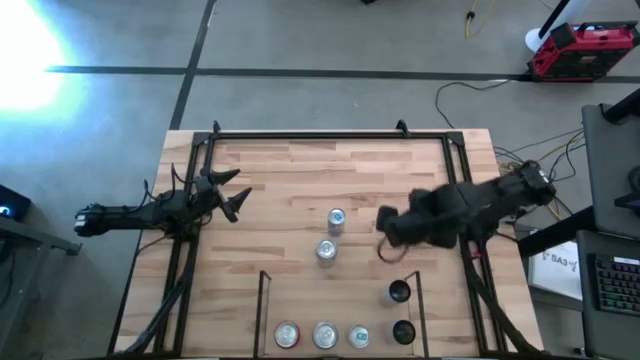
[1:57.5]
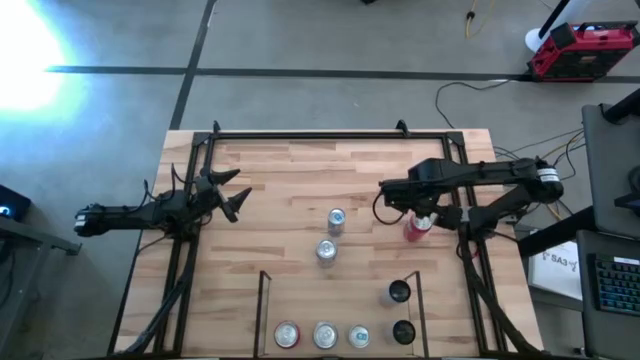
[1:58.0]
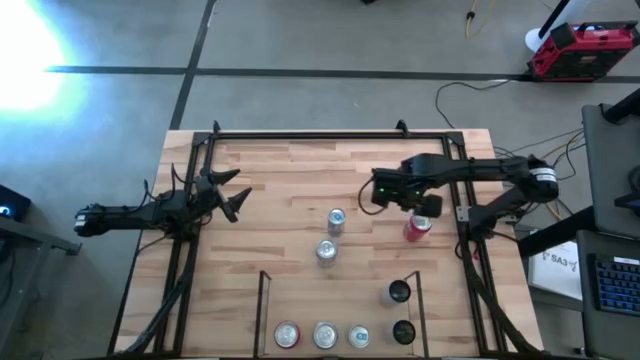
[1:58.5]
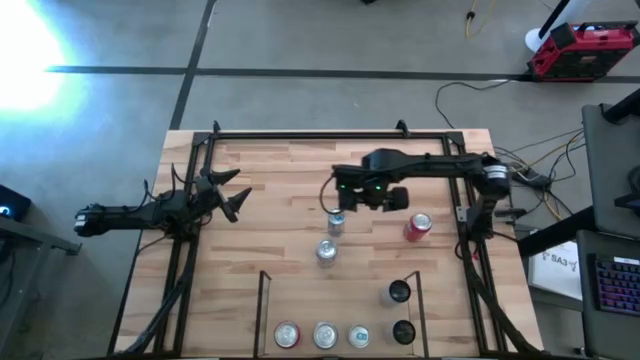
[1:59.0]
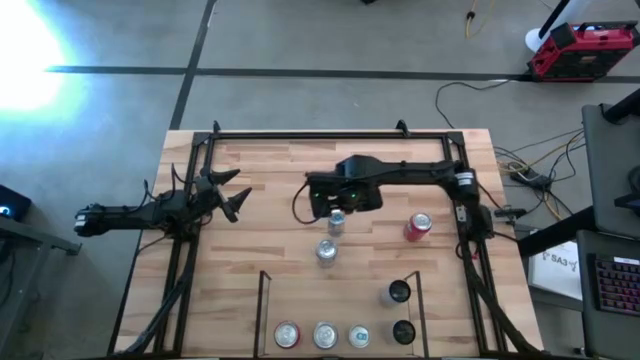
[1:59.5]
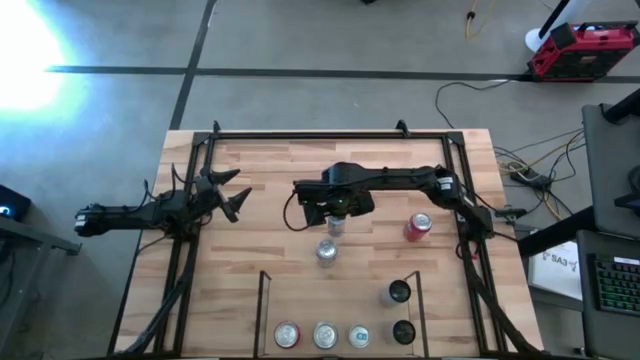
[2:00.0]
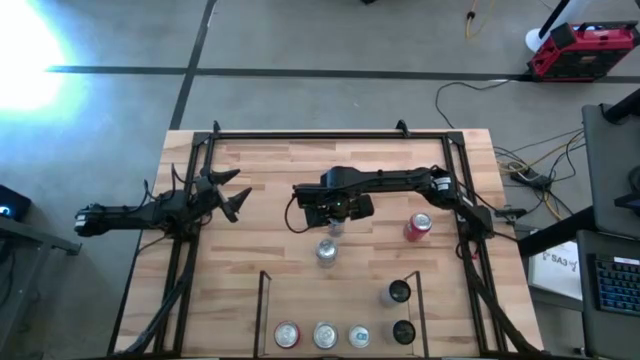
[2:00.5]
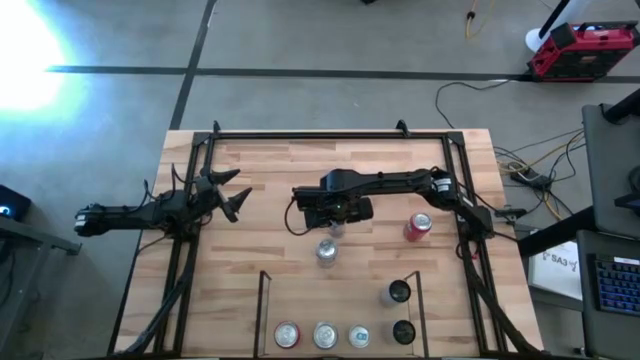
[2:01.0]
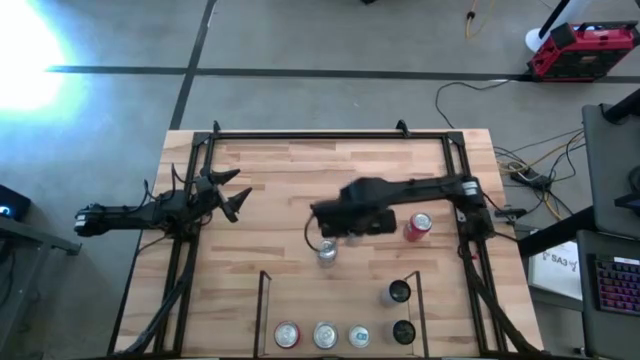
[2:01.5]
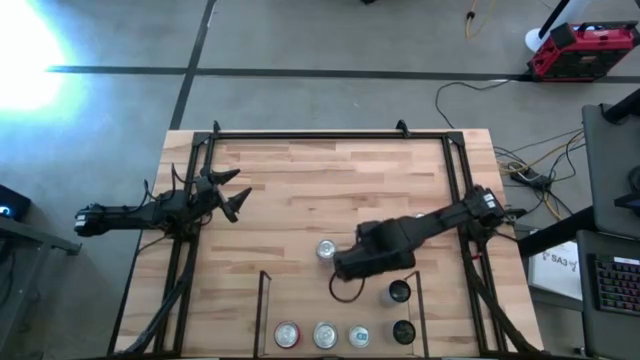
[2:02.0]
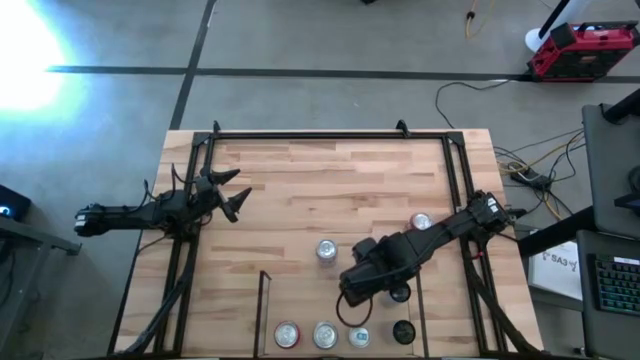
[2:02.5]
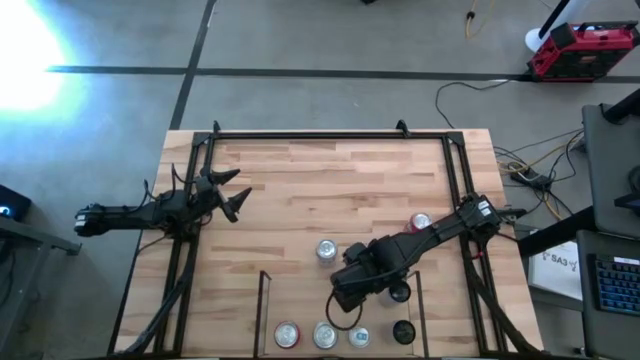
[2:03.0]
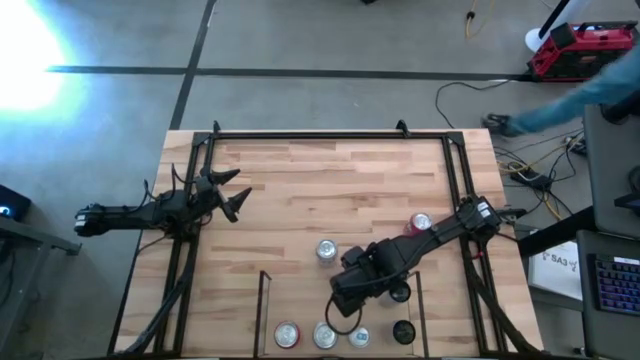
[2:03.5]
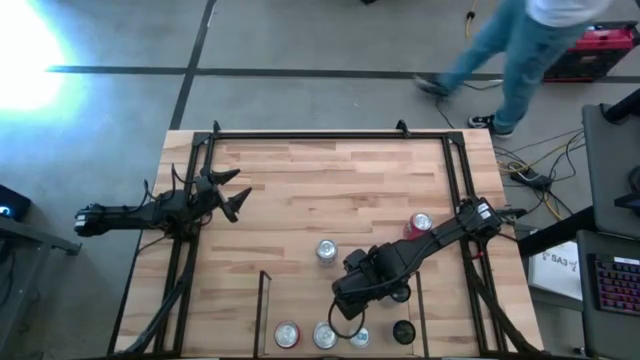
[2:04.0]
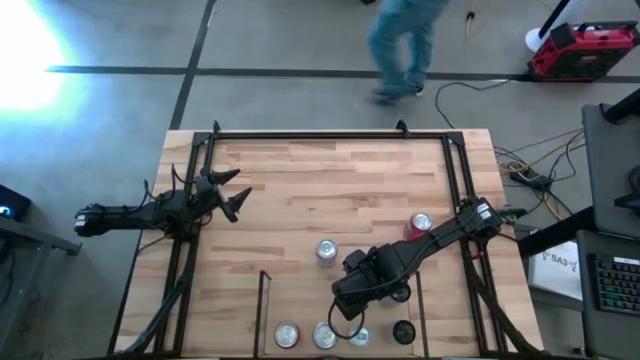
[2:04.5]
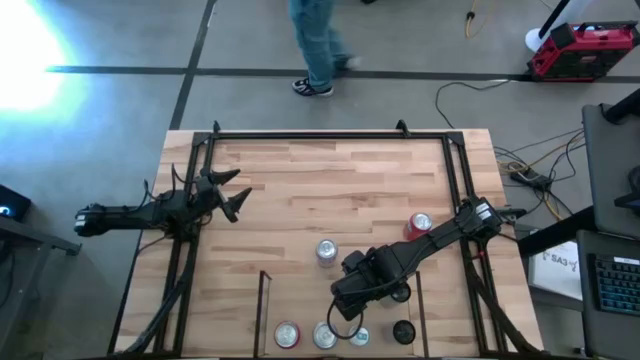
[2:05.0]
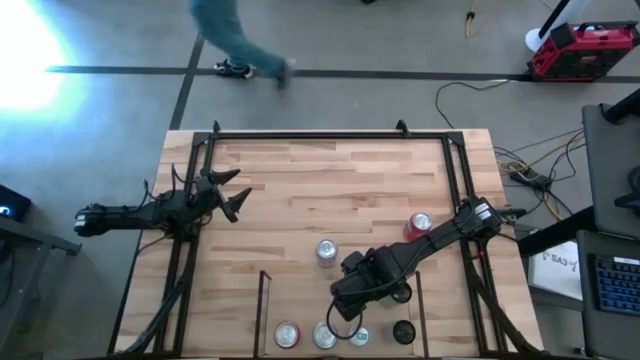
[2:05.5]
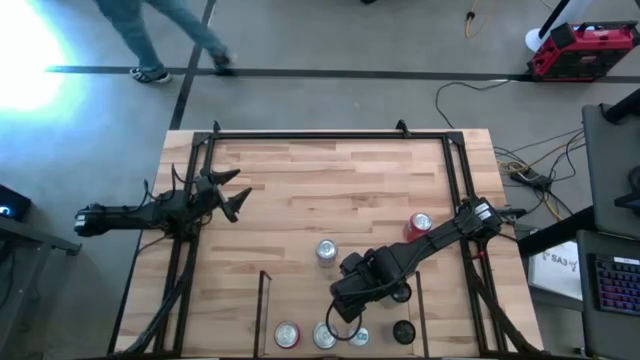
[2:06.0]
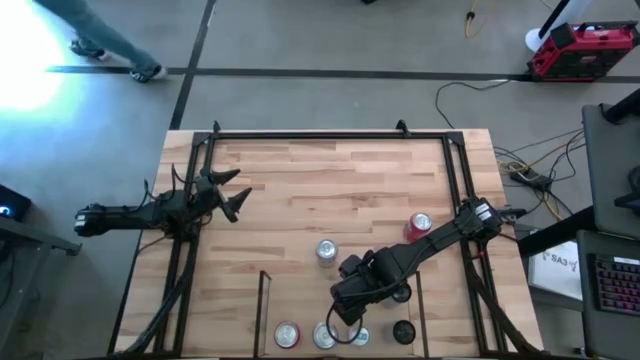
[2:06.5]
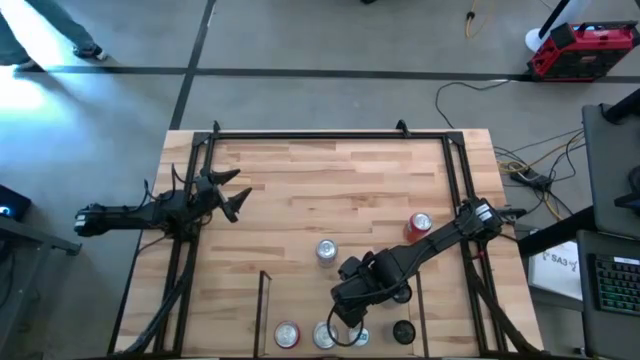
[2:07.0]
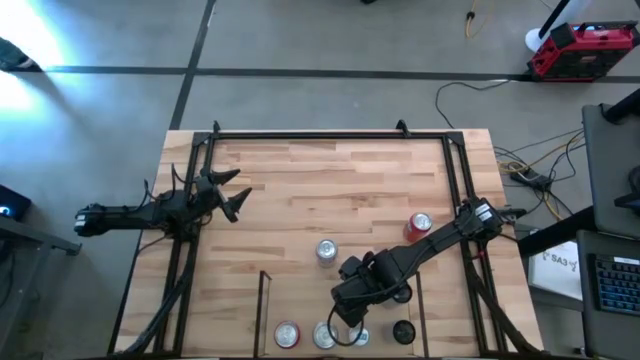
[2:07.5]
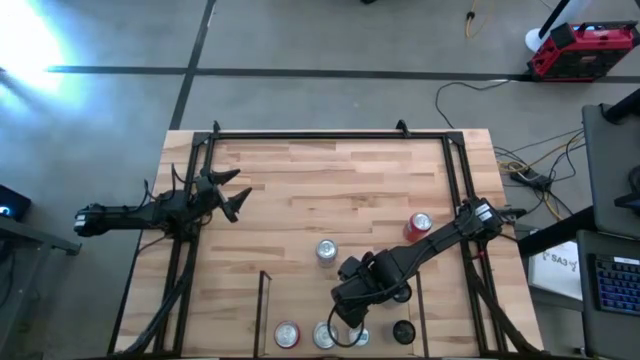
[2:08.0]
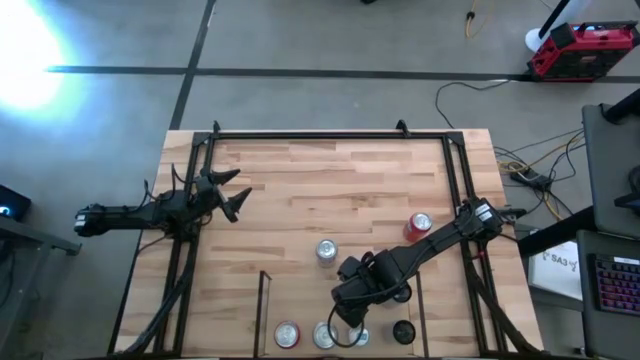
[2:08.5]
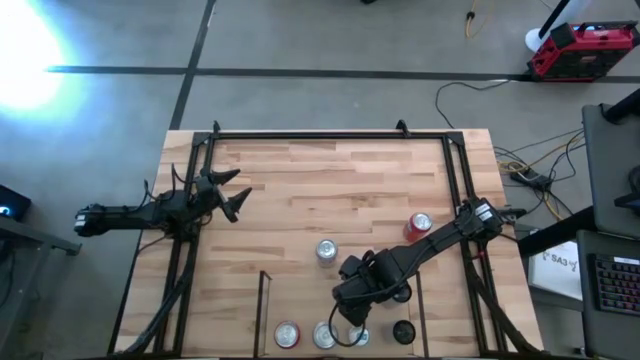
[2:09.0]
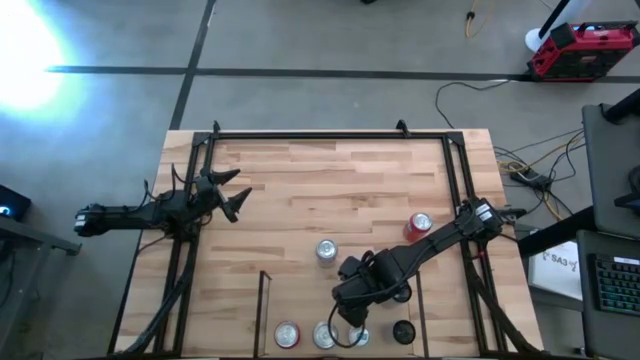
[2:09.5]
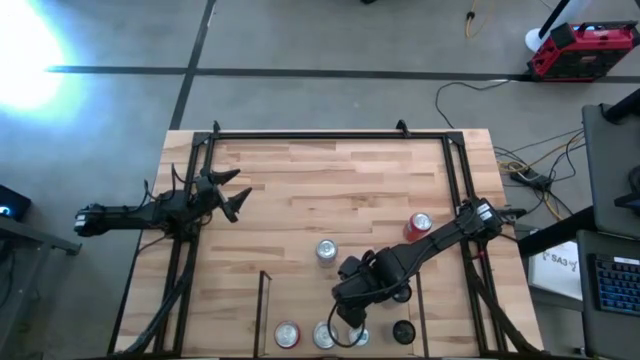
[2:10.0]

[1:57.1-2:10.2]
Task: Place canned beverage on shelf
Put the blue soda can on the shelf aligned with the other blue soda can

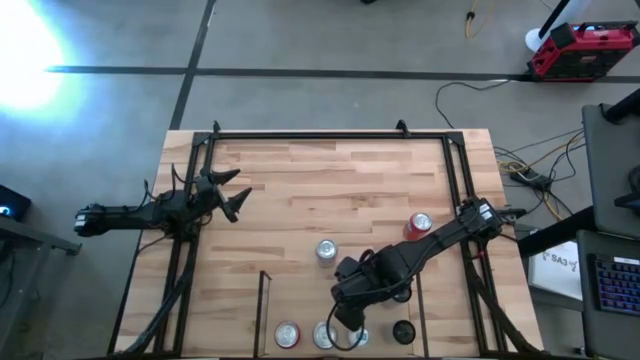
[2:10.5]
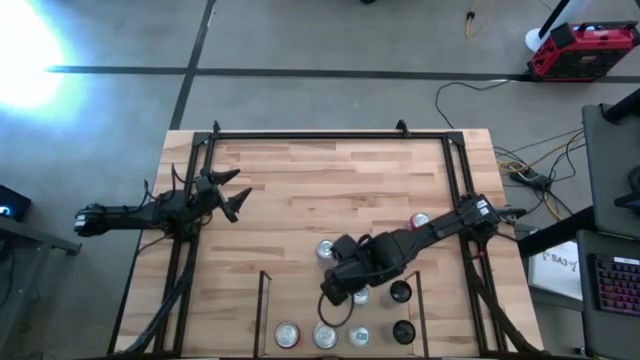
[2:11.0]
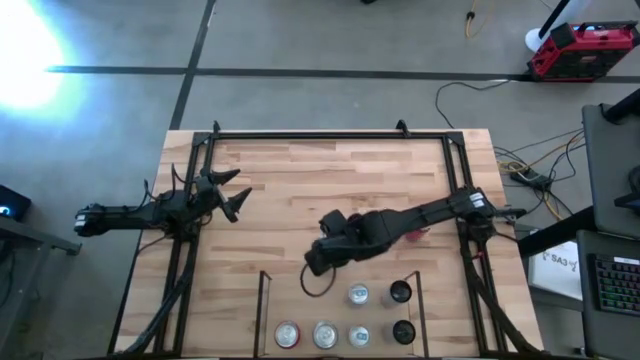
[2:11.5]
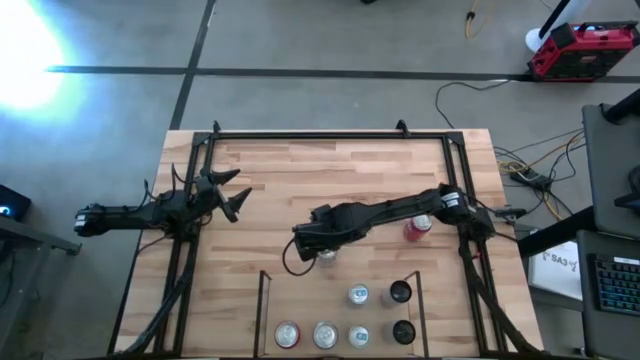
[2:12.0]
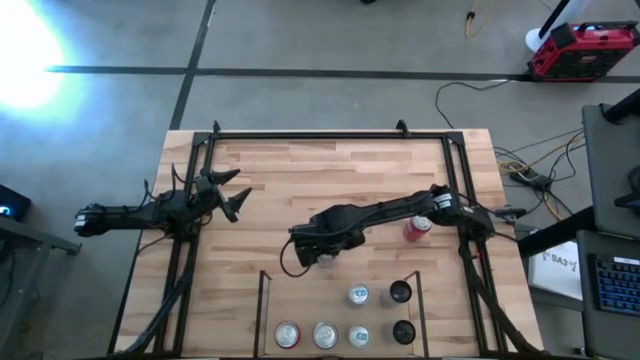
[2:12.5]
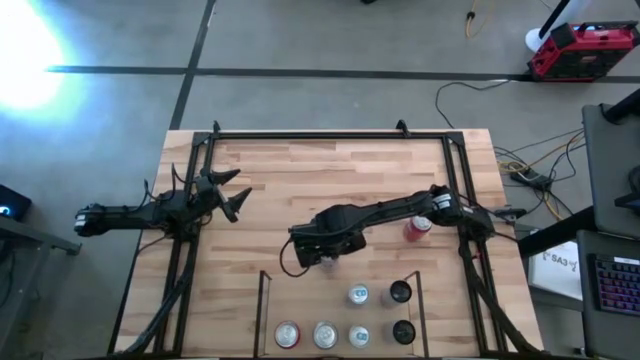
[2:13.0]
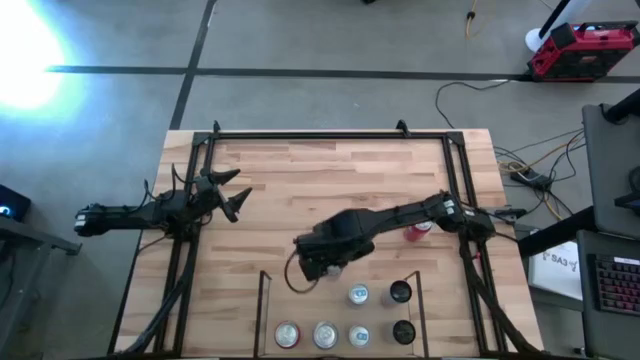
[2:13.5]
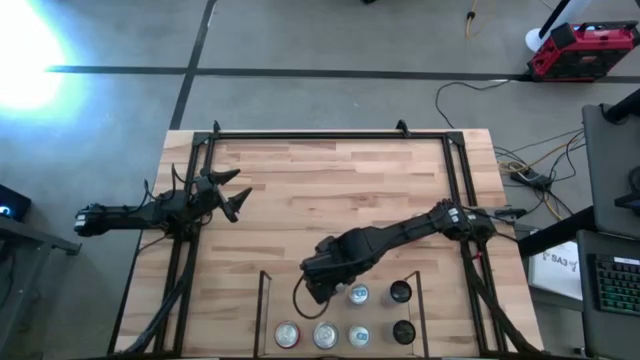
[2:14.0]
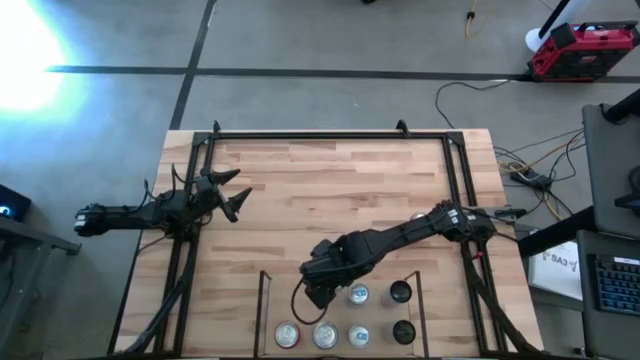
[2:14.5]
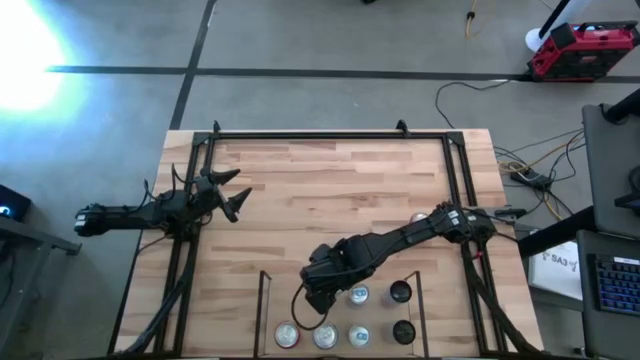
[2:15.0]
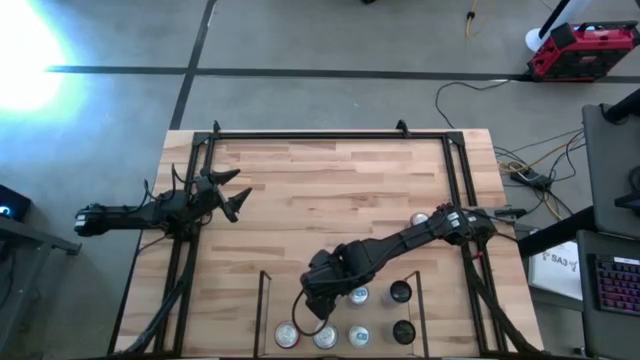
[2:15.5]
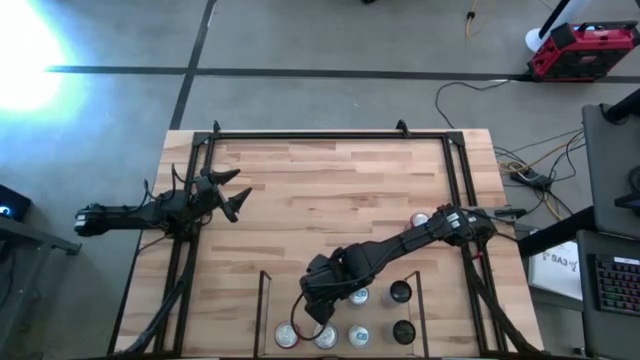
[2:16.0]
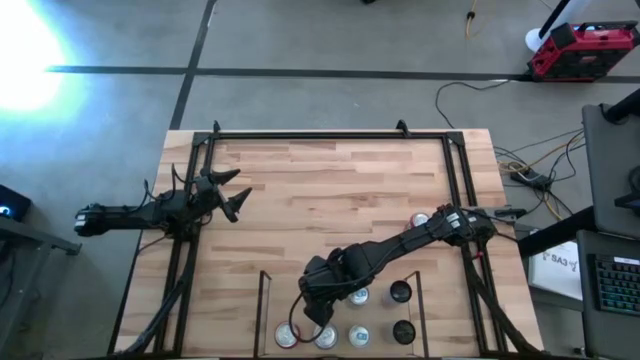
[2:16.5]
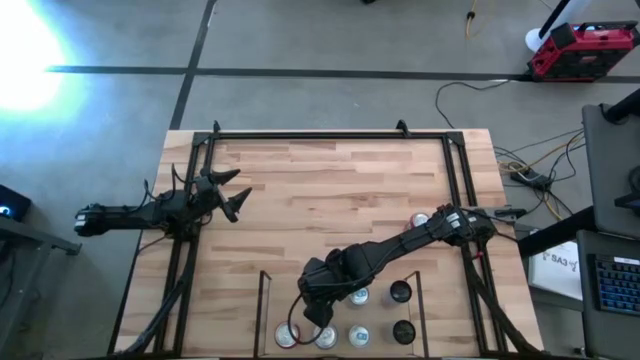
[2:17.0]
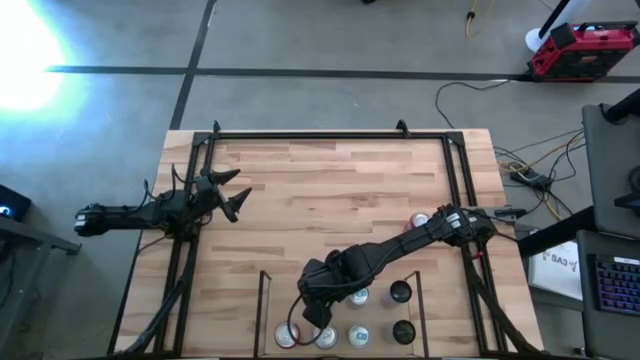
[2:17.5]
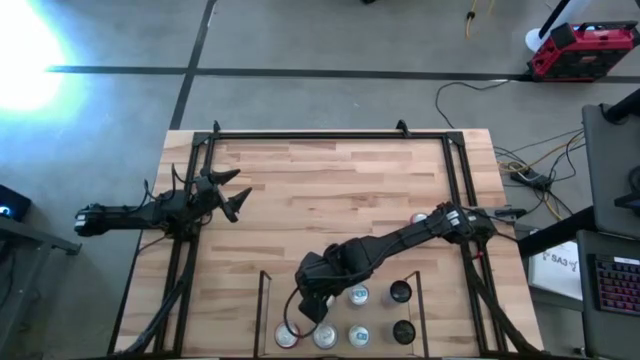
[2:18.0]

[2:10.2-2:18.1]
Put the silver soda can on the shelf aligned with the other silver soda can

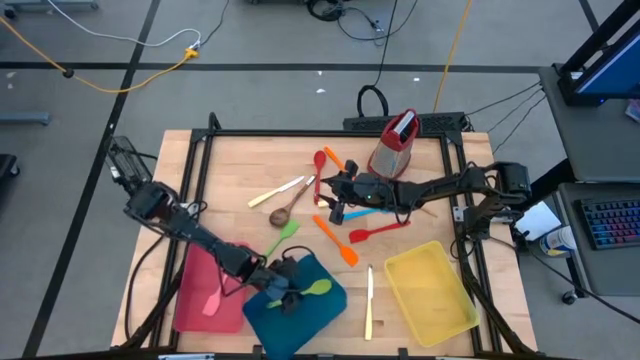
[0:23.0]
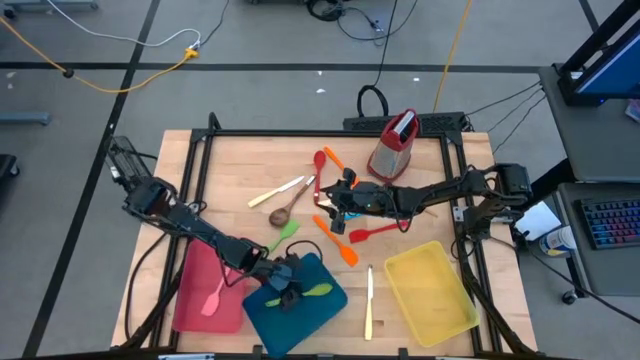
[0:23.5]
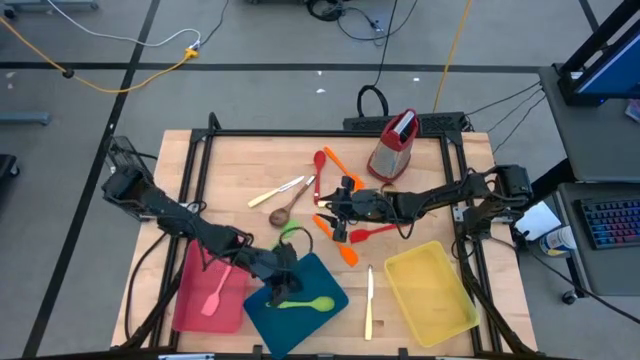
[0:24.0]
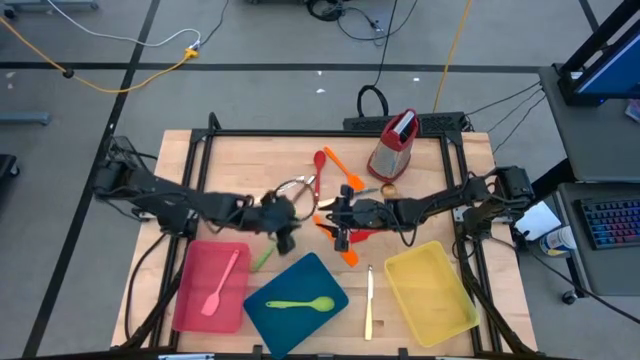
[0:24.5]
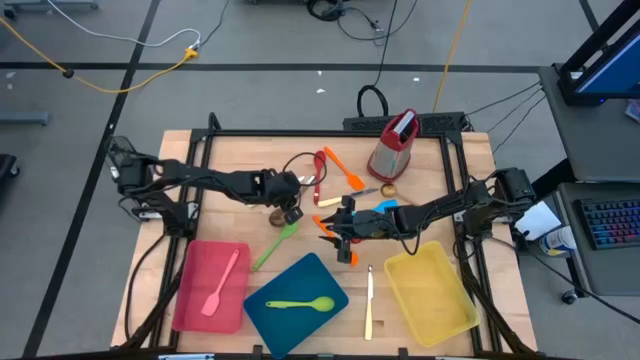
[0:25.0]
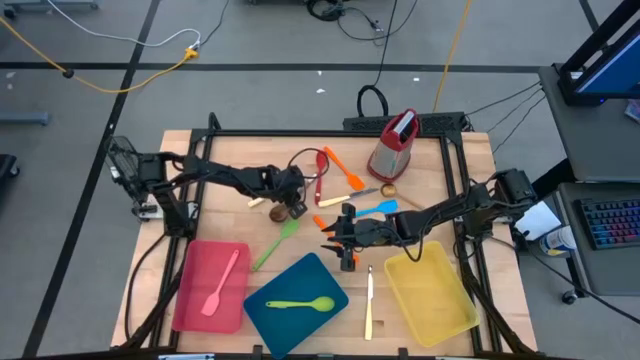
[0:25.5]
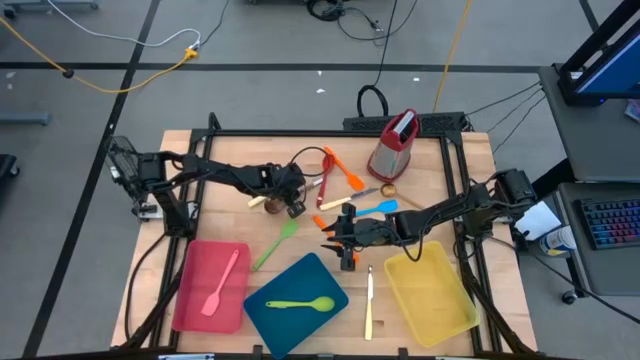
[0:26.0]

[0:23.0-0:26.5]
Task: Pick & Place Kitchen Items
Put the brown serving spoon into the blue bin
